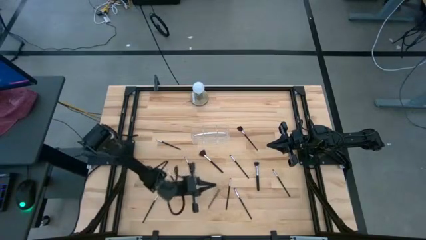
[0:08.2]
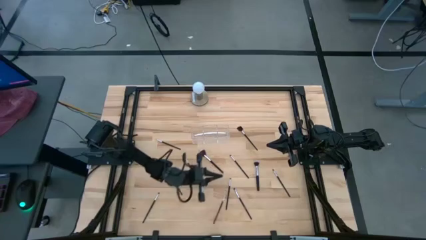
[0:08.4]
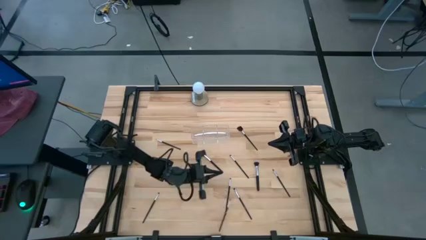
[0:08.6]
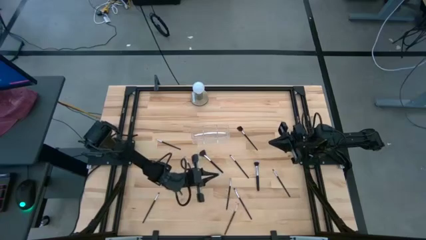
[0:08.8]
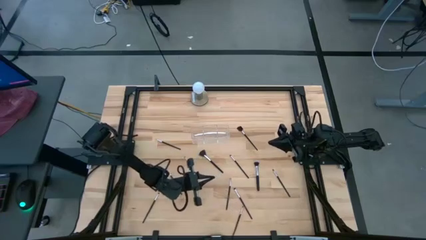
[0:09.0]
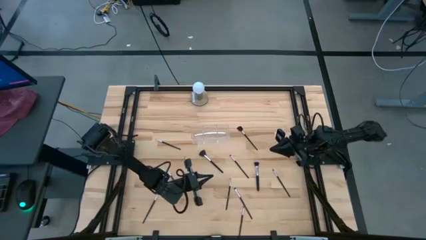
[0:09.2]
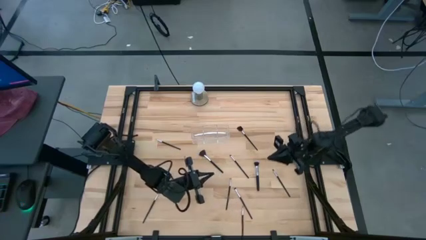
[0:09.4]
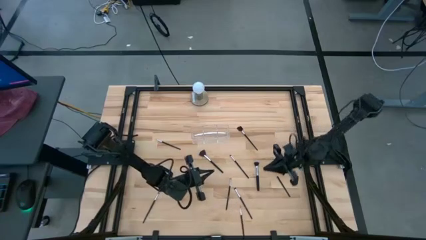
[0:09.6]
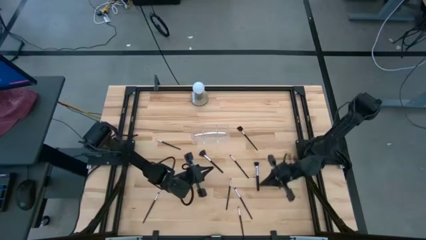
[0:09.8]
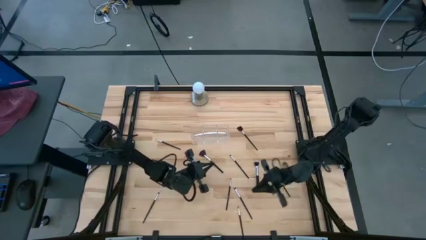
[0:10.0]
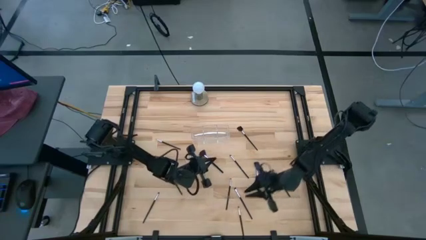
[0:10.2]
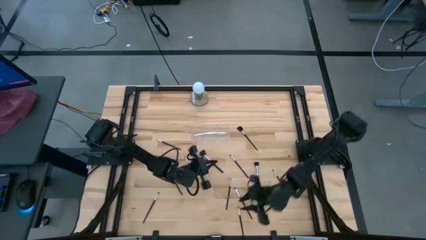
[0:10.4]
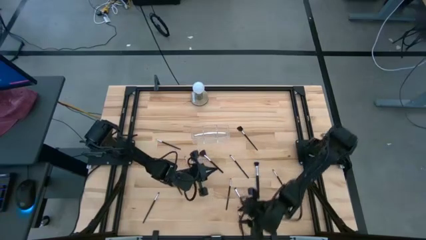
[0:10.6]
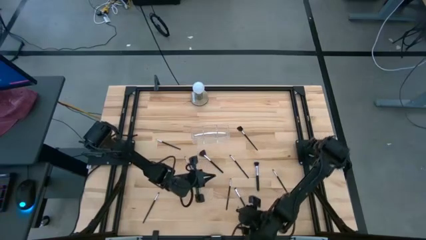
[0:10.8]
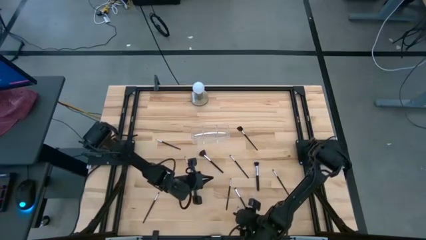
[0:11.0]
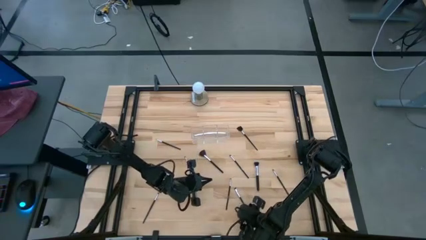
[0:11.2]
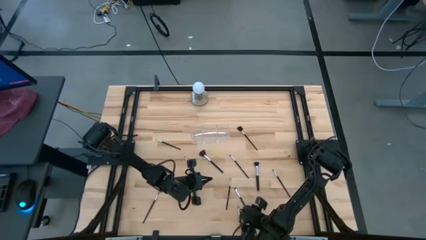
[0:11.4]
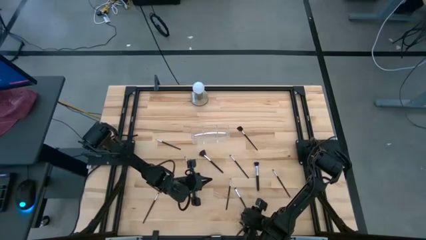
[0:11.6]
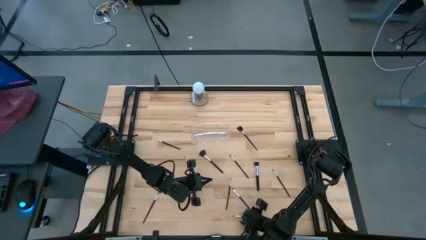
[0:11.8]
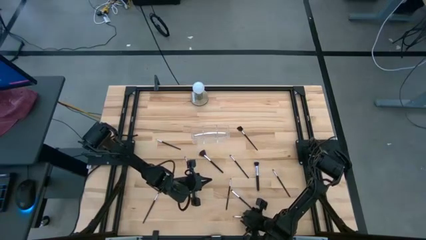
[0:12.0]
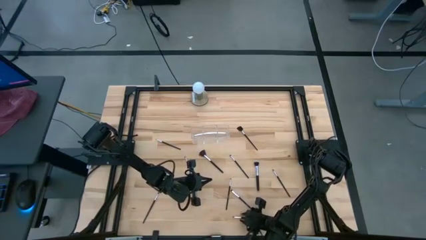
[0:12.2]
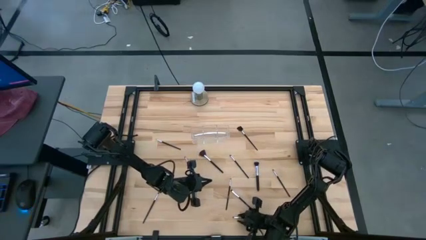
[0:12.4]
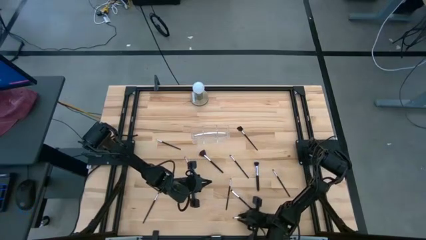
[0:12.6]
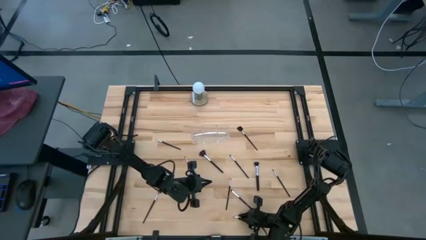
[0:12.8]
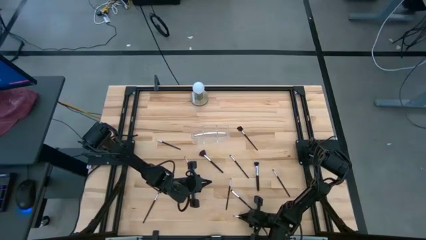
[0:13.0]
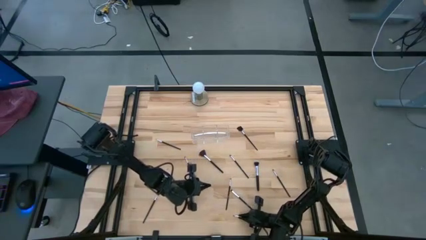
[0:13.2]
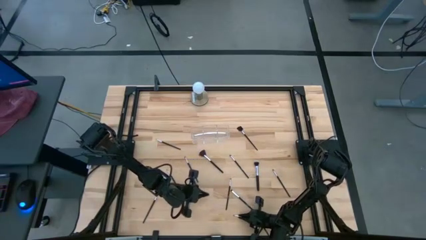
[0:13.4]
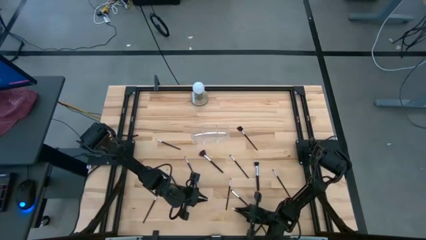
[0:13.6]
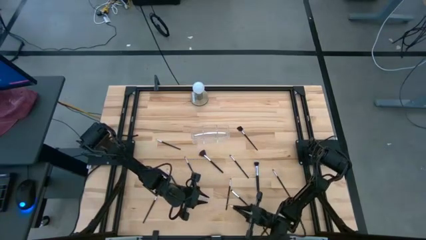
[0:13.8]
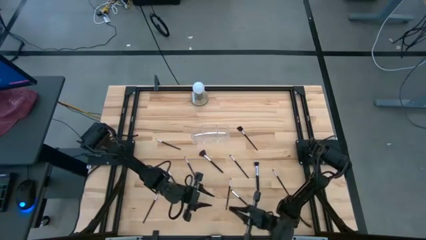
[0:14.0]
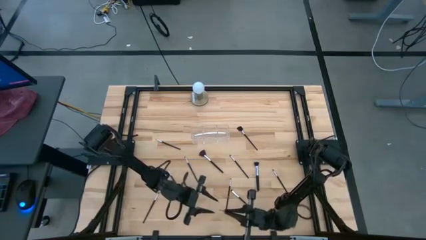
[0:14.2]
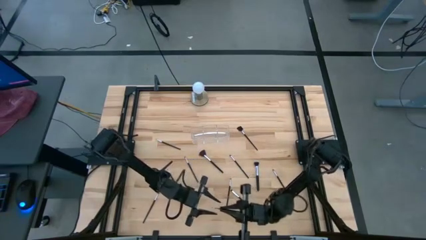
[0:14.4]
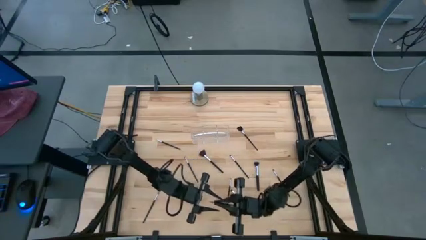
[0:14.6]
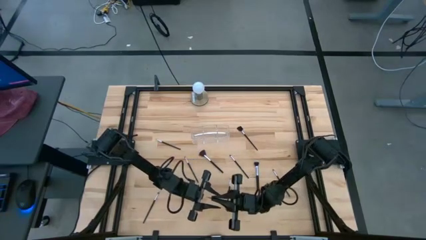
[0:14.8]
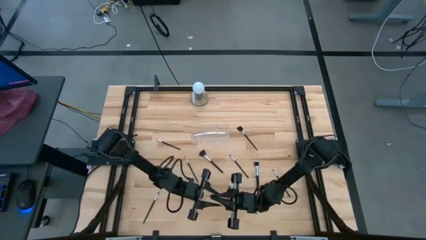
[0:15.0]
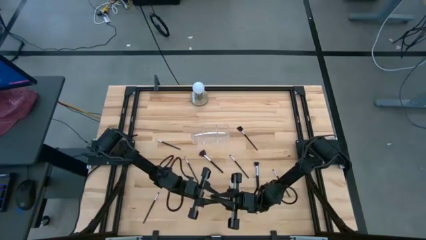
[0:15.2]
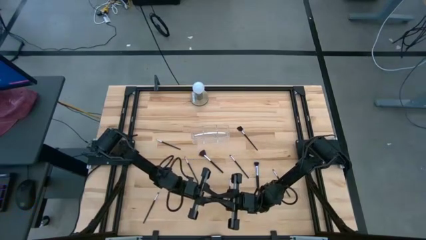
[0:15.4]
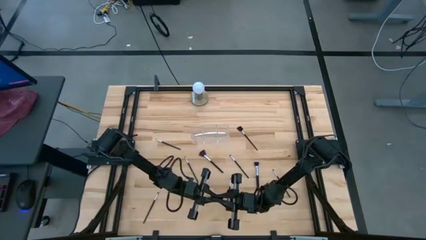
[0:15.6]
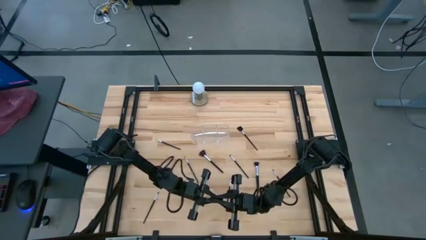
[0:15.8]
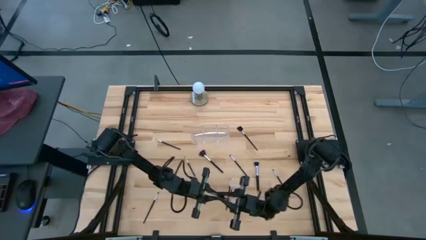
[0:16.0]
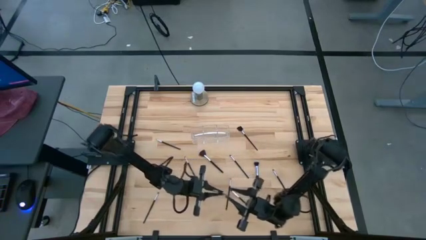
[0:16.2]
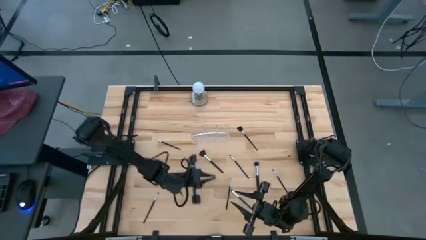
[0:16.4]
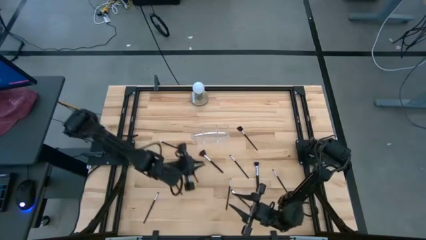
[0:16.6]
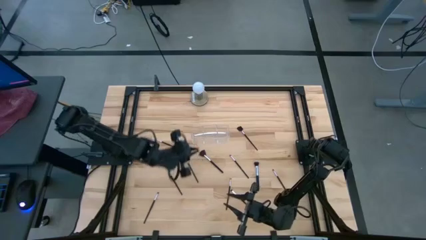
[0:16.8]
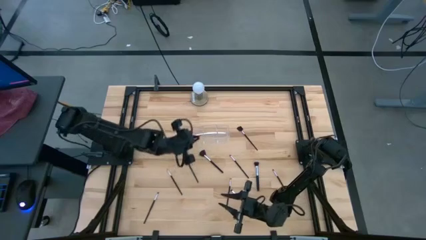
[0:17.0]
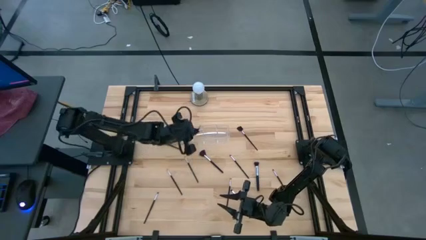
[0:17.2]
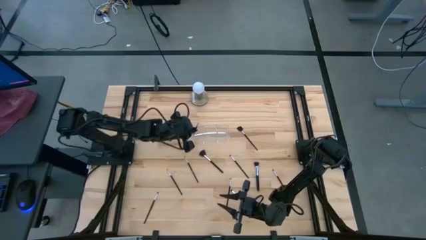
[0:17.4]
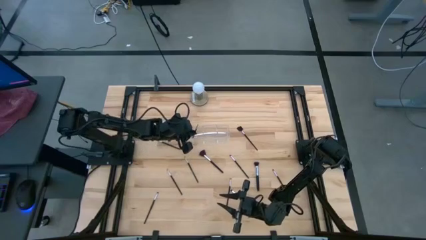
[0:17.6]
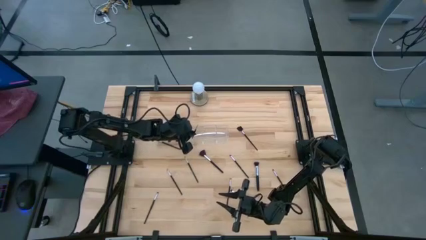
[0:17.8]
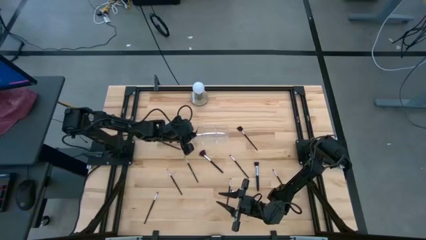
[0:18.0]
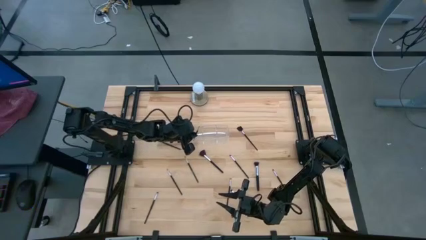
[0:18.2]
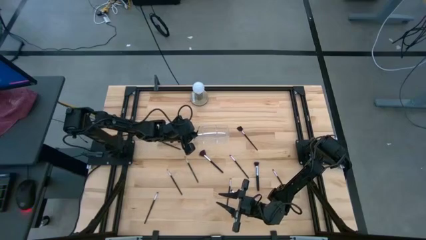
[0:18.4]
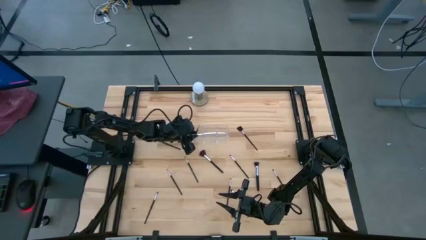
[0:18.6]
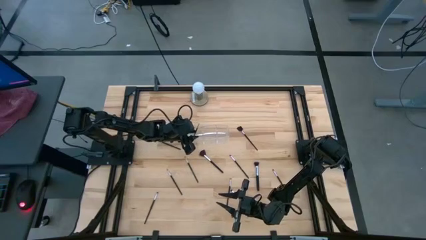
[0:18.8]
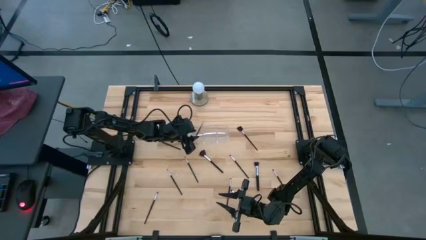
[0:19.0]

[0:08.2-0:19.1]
Task: Put items in baskets/containers
Put the bottom liner brush into the transparent organizer

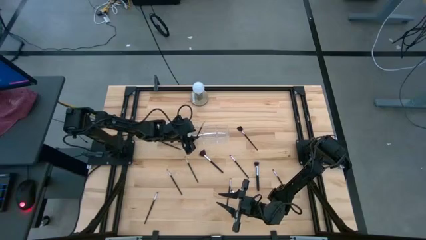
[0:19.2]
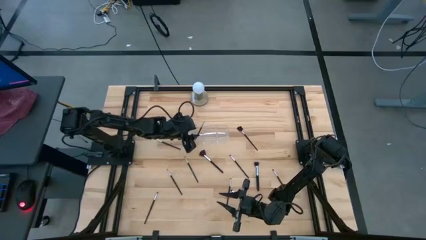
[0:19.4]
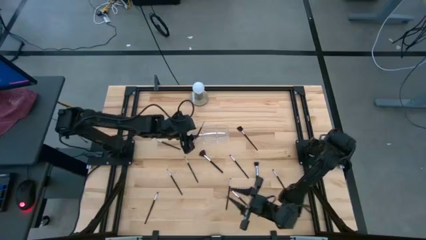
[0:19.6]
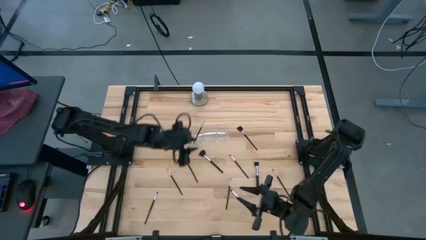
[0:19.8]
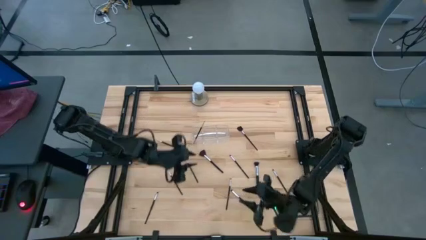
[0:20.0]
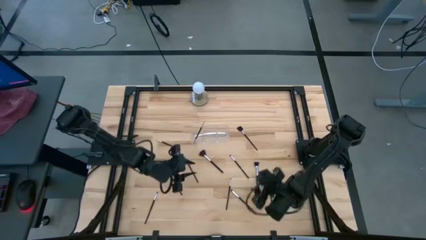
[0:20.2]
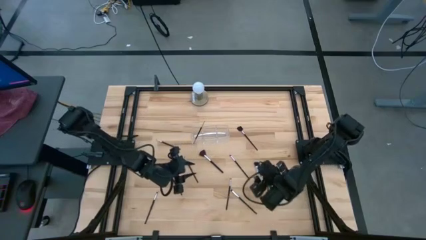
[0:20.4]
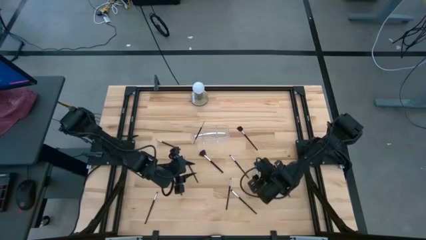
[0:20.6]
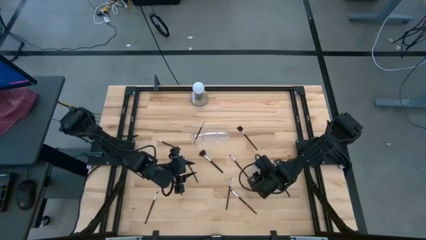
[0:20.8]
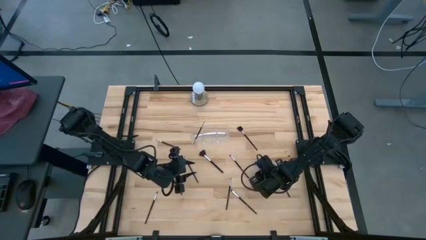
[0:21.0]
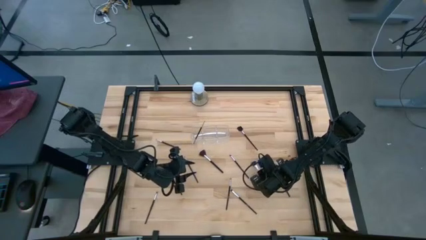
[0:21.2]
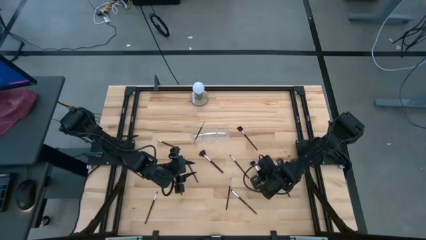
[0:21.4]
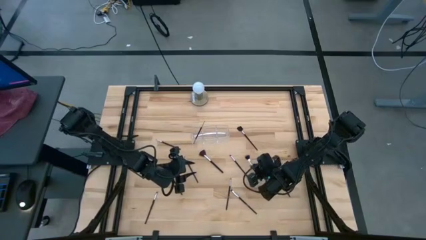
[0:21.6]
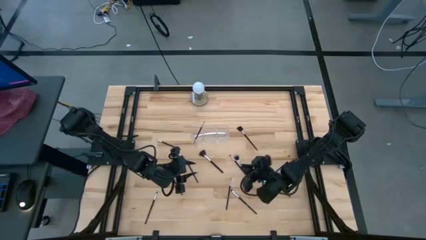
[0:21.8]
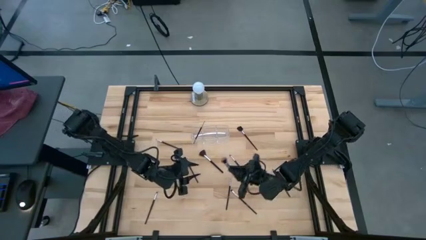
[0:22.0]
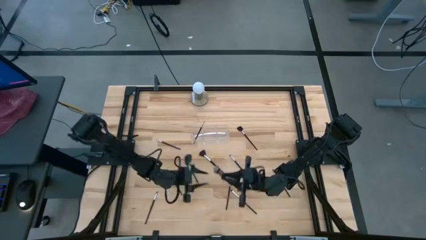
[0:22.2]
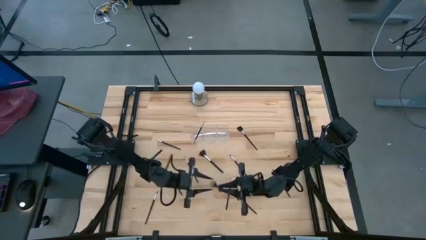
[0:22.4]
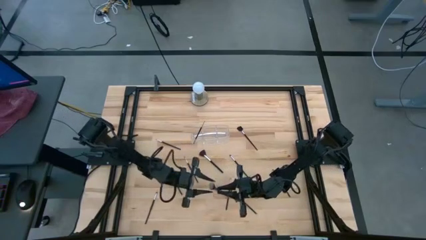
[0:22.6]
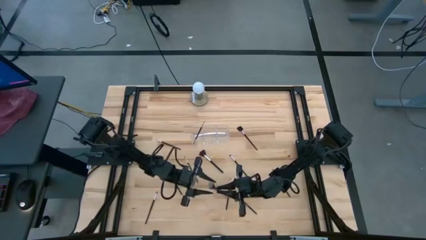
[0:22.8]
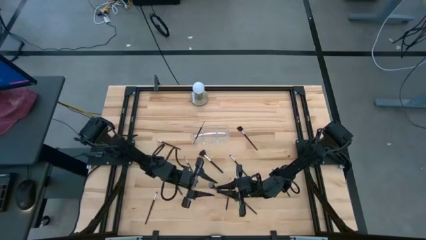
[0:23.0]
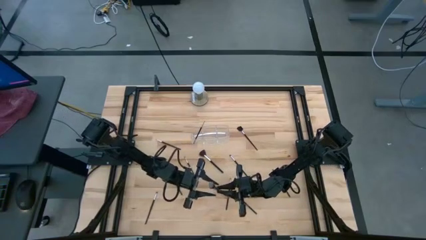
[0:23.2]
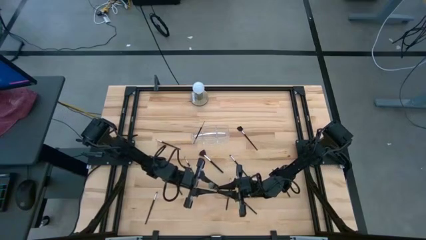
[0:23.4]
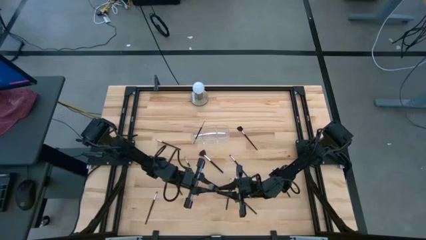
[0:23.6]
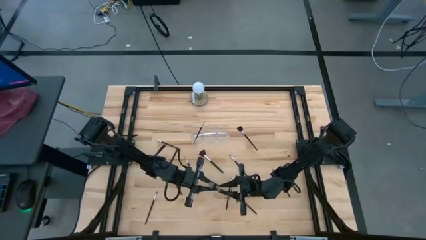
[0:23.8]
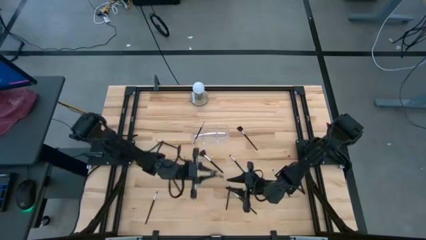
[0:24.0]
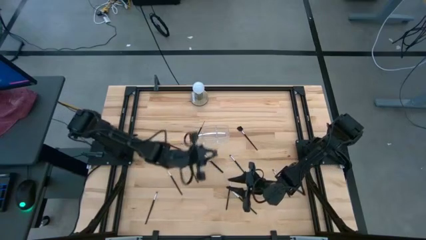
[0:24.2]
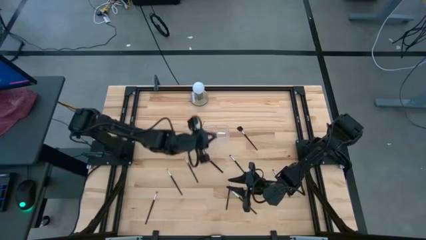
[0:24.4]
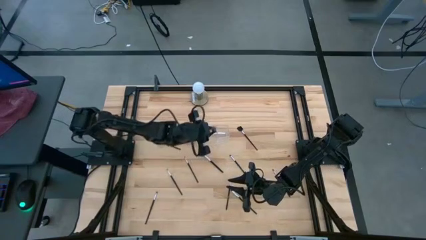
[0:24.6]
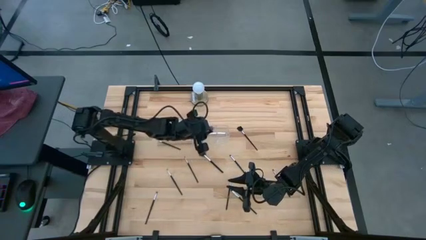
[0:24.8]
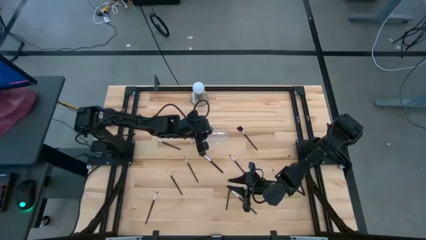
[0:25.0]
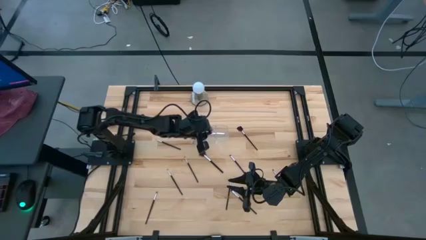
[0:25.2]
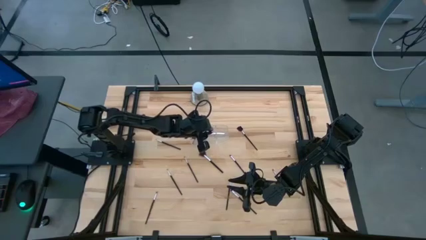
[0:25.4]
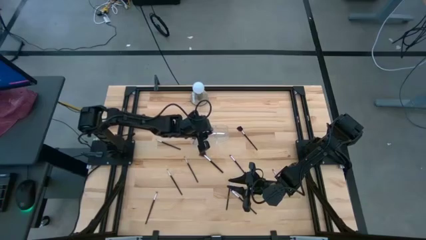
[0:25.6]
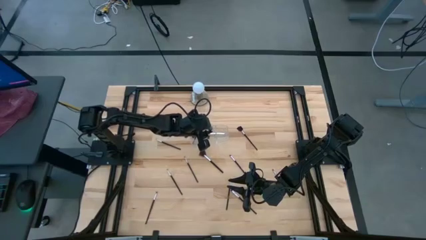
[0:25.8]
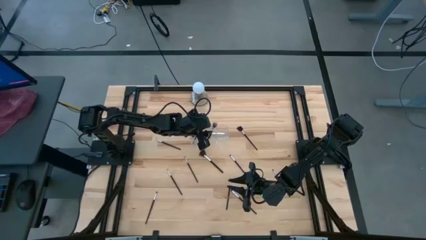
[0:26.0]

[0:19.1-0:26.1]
Put the powder brush into the transparent organizer
